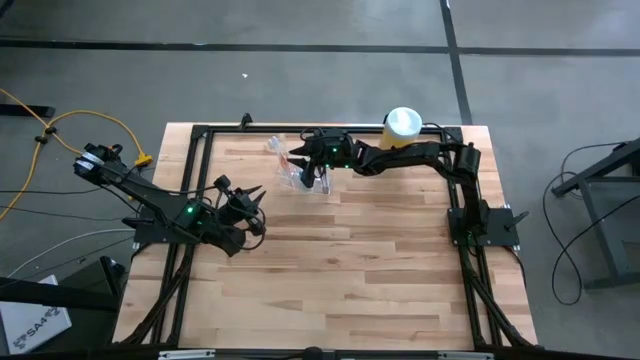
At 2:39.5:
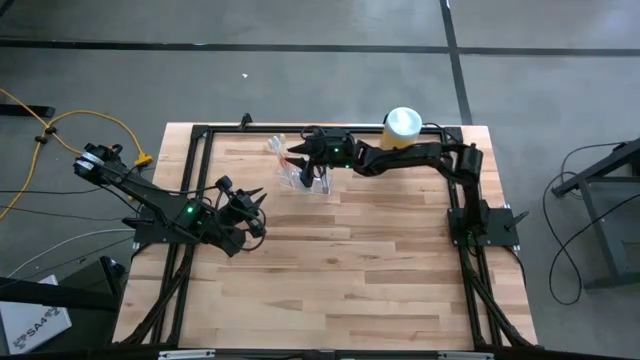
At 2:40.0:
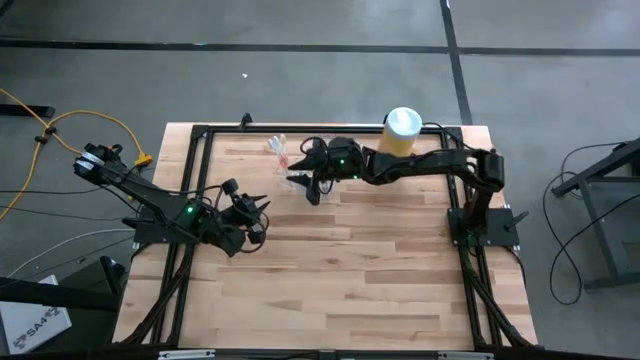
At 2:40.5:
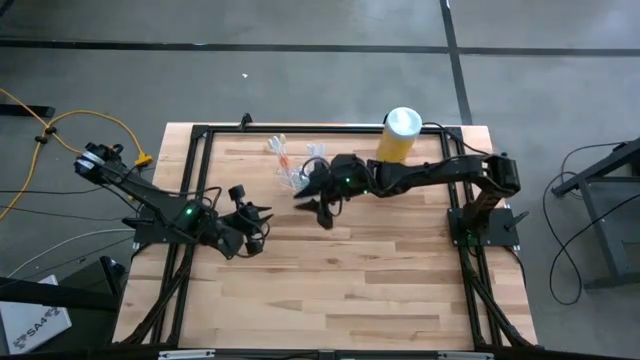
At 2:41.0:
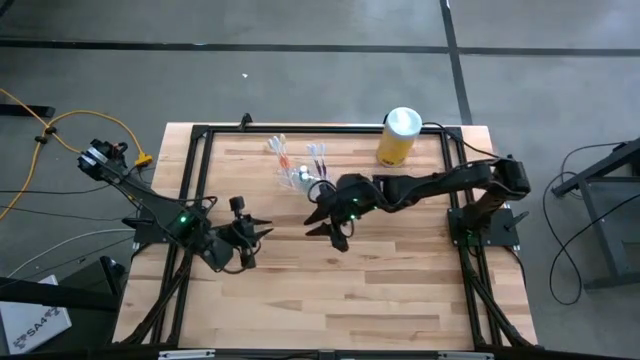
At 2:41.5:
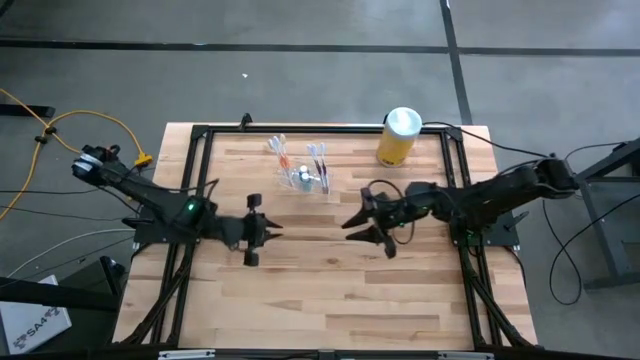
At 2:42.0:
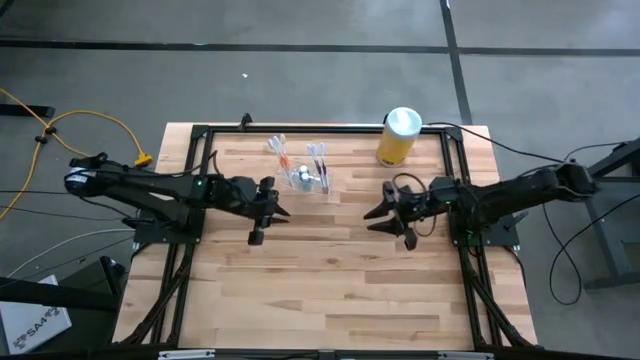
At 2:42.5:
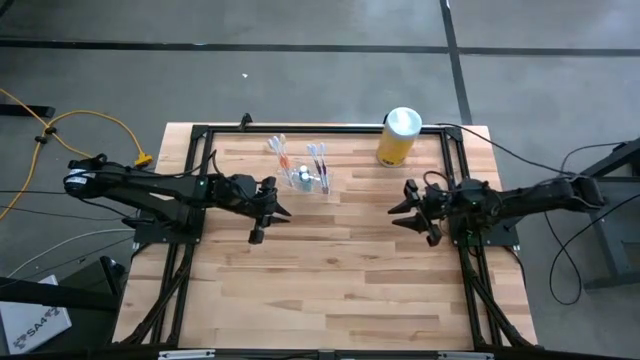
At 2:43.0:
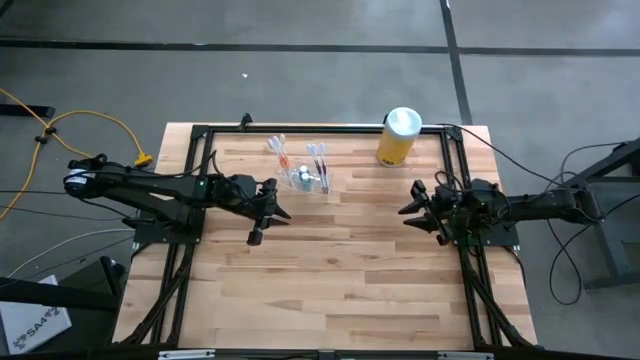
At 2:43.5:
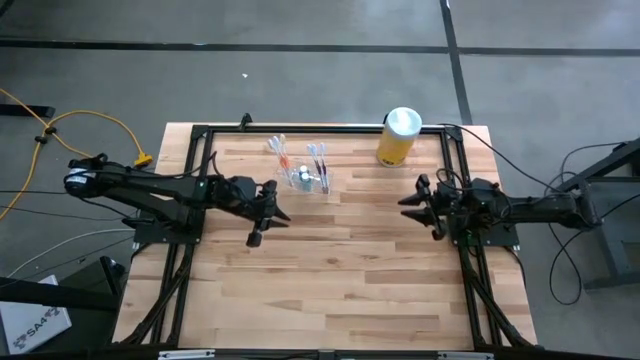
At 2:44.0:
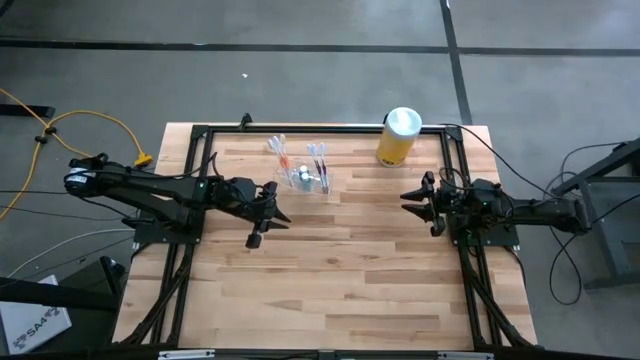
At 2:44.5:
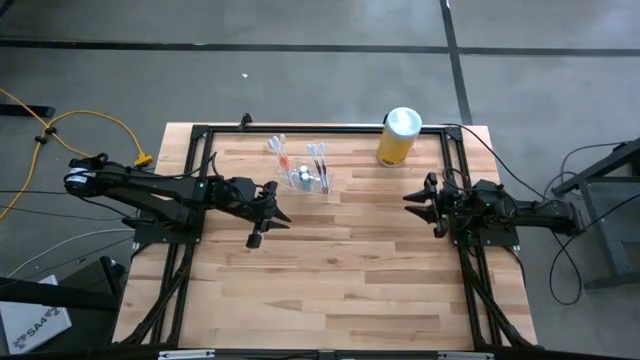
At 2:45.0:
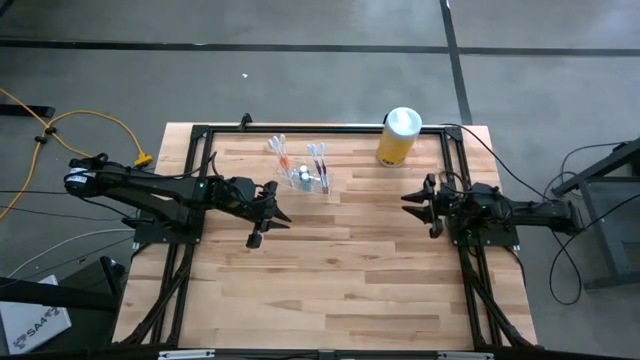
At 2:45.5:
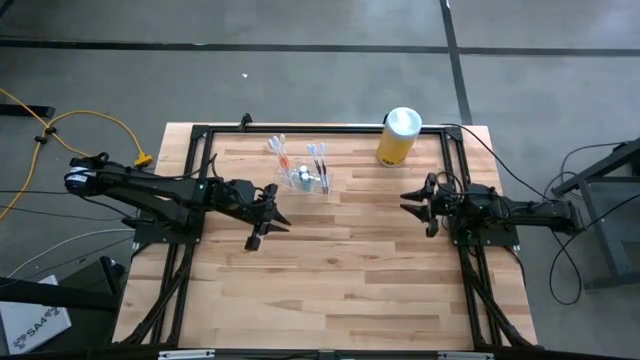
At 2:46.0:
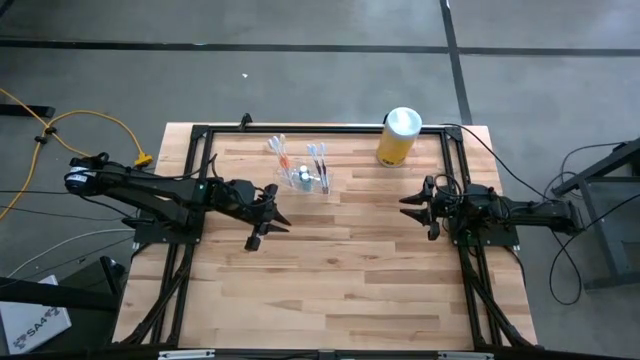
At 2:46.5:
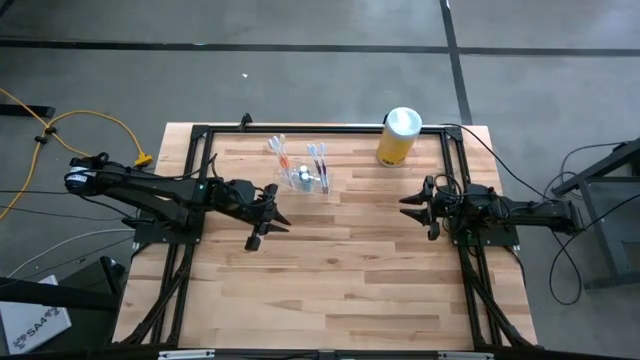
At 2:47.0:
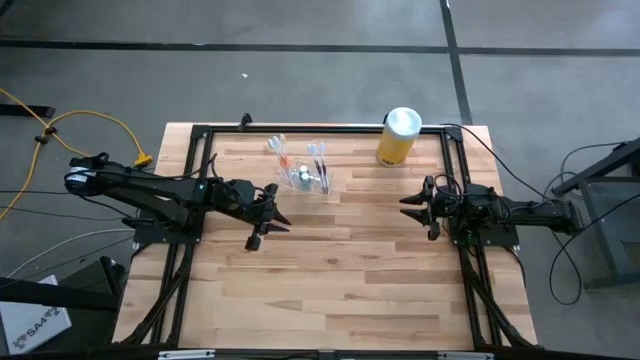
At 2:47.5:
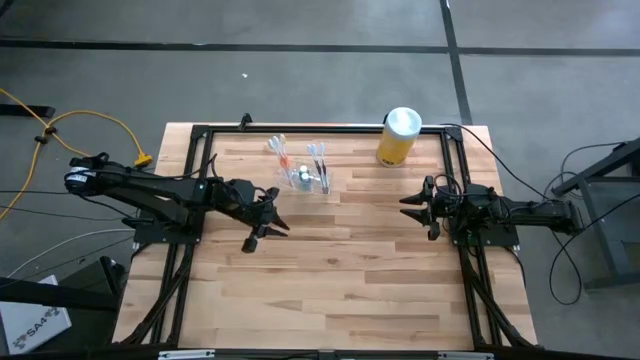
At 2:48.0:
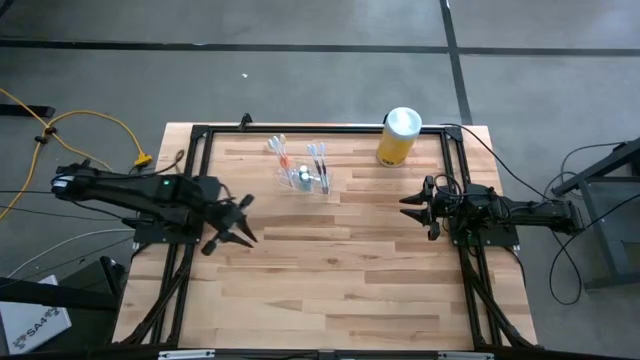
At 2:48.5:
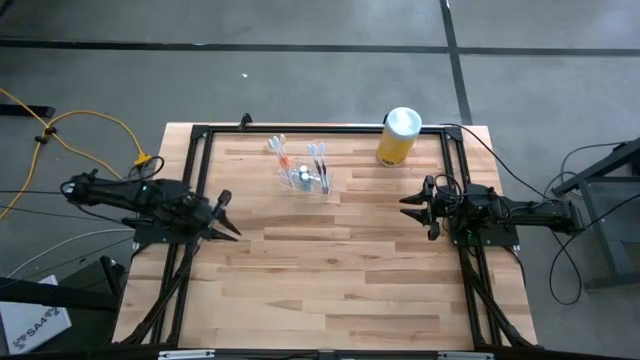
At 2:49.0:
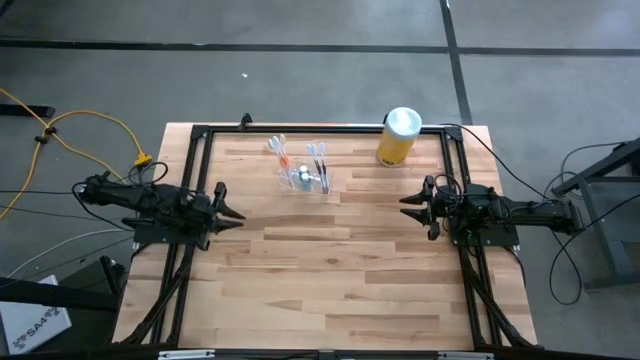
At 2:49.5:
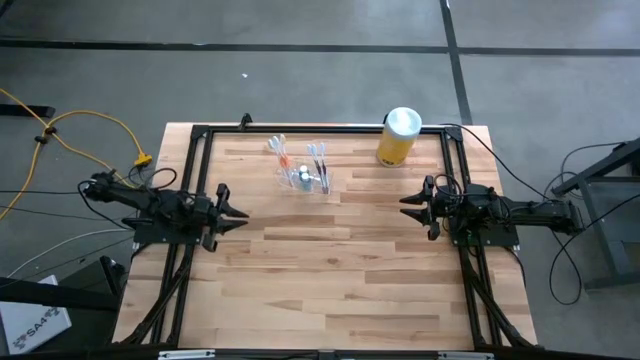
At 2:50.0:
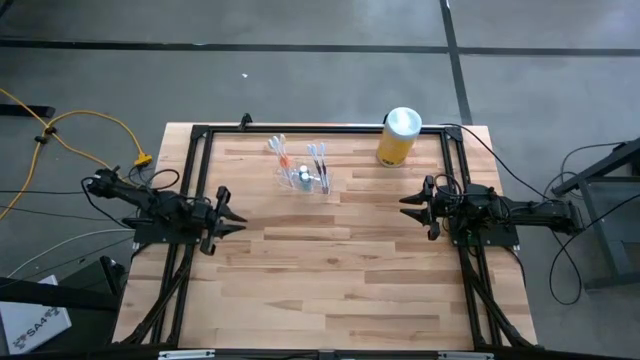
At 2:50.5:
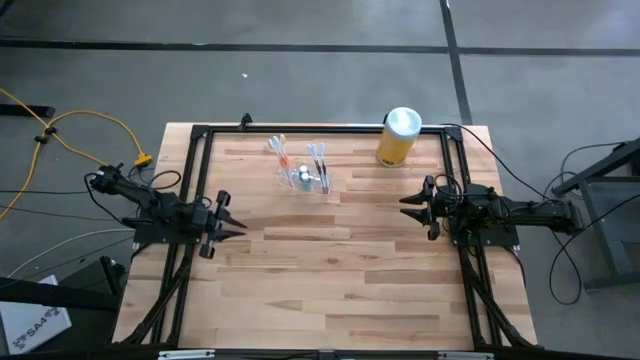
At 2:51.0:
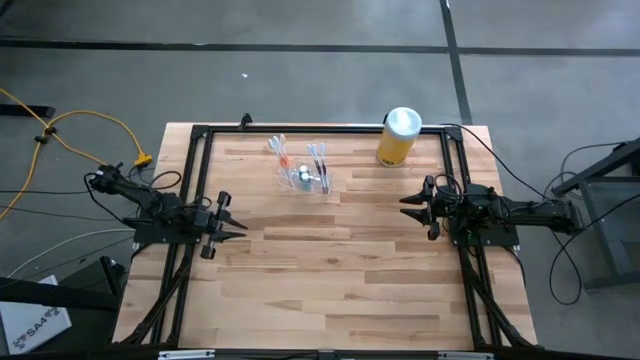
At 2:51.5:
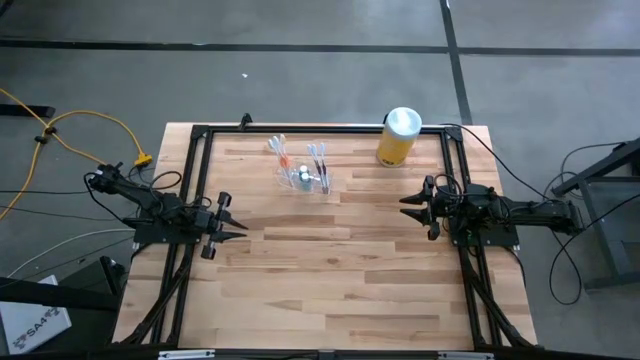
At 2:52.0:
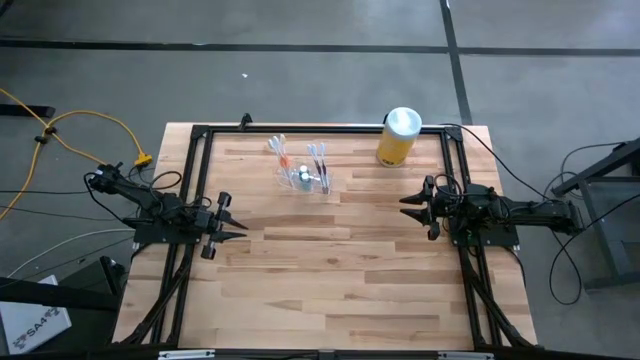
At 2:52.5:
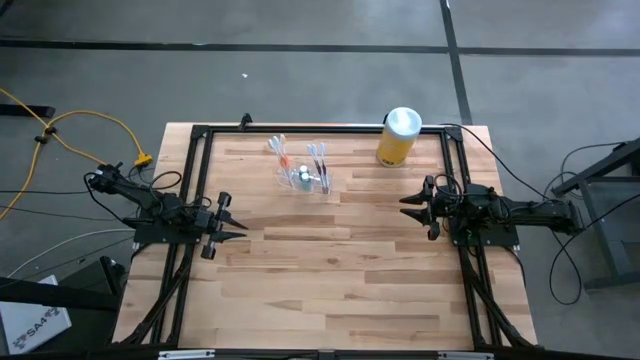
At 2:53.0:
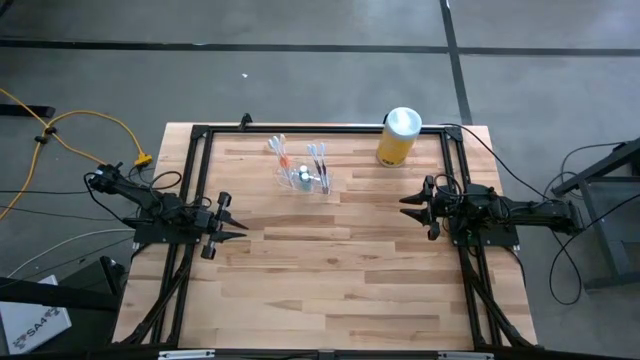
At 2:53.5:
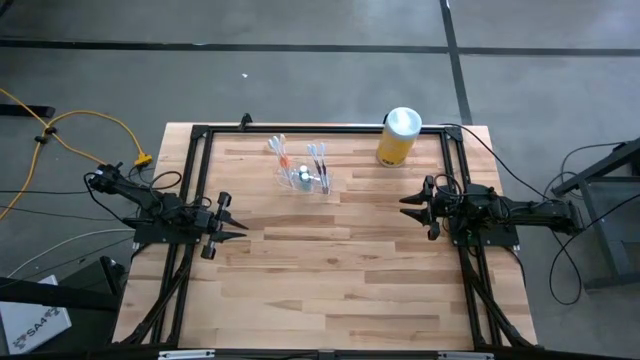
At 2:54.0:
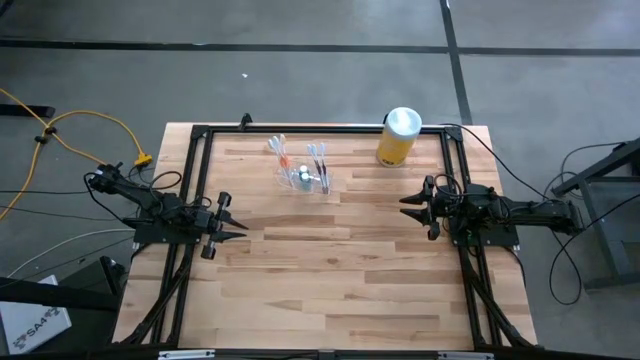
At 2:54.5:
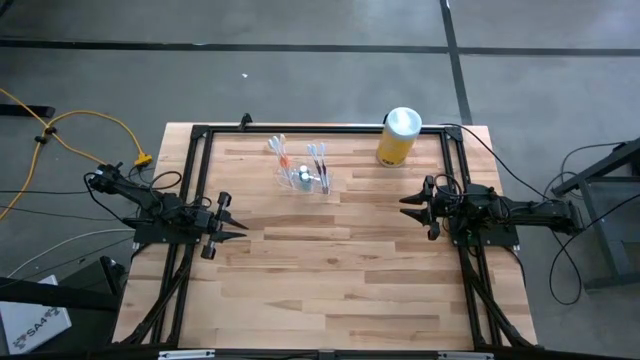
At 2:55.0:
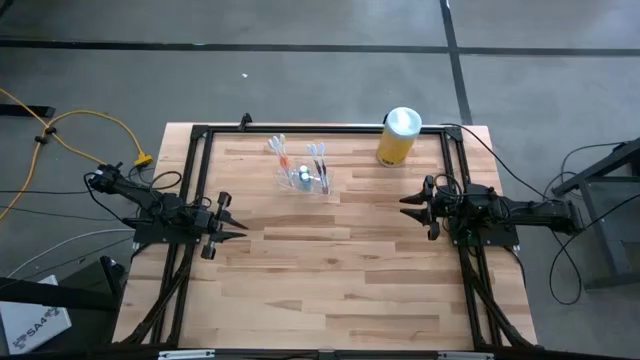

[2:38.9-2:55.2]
Task: Pick & Place toothbrushing station
Return to Home Position

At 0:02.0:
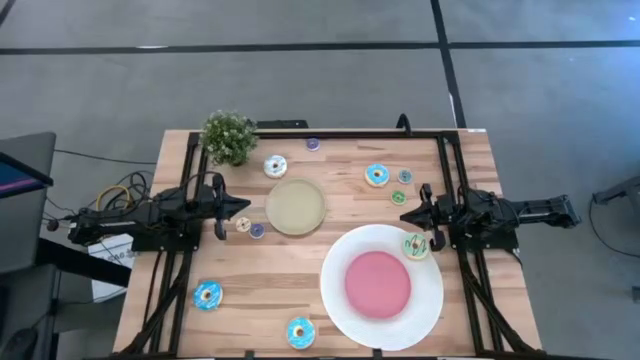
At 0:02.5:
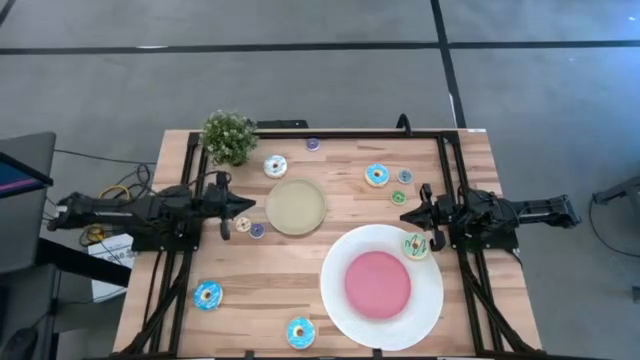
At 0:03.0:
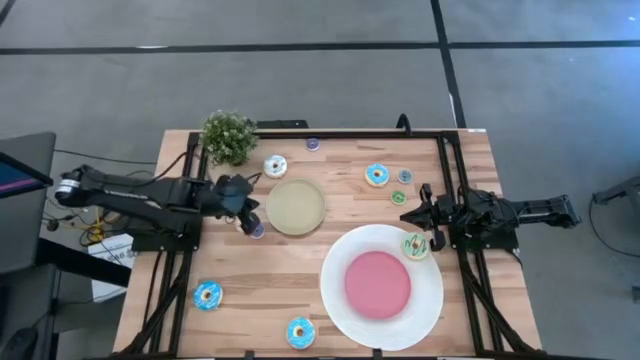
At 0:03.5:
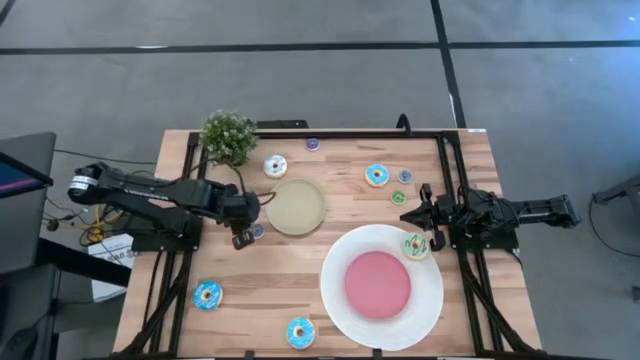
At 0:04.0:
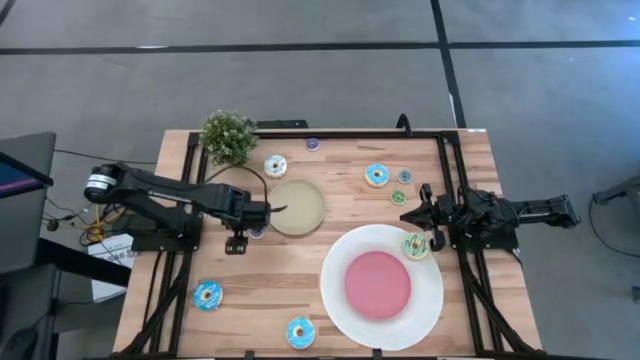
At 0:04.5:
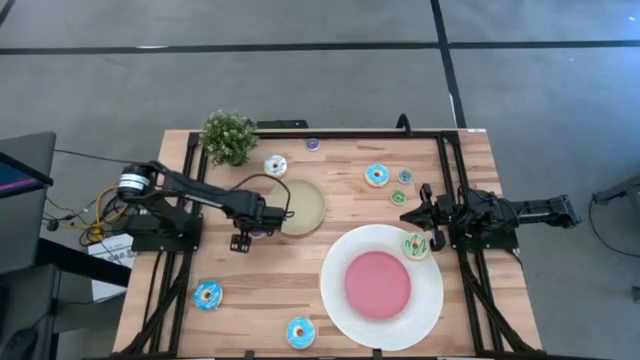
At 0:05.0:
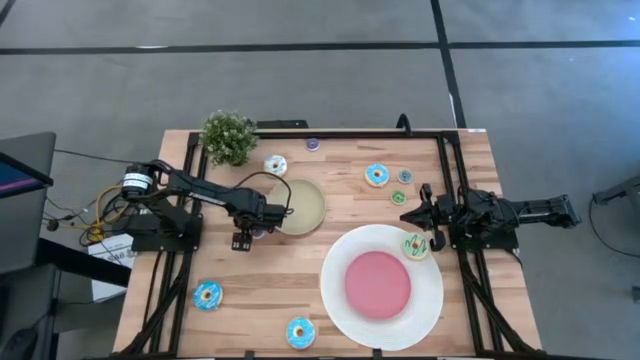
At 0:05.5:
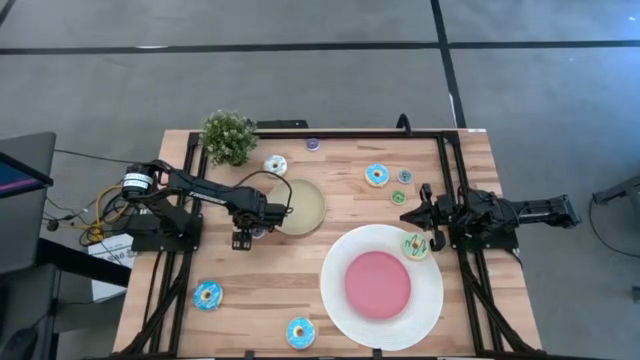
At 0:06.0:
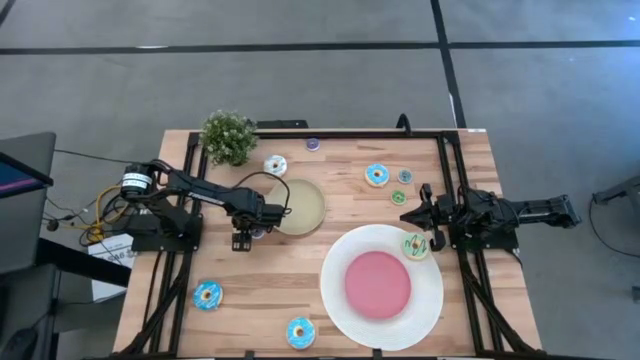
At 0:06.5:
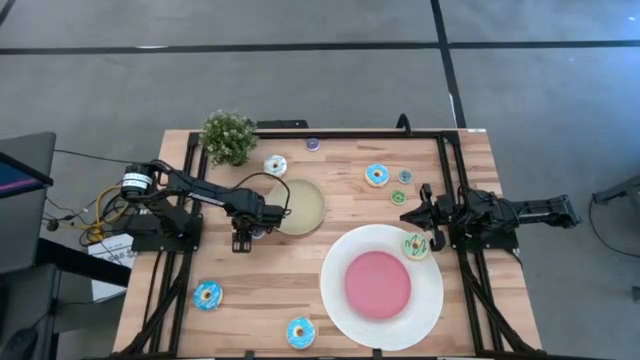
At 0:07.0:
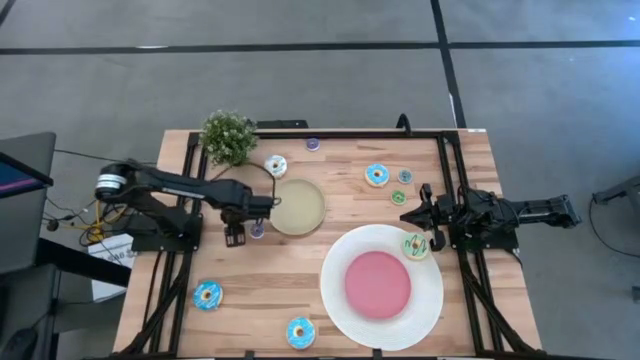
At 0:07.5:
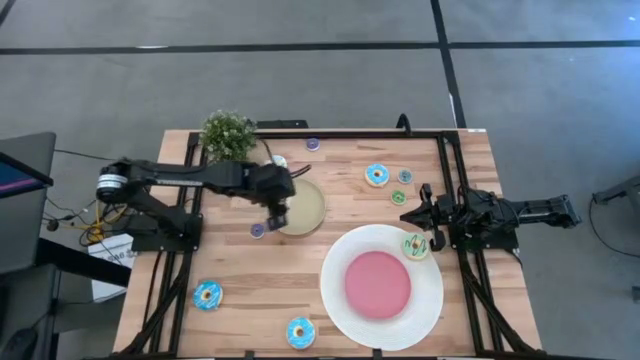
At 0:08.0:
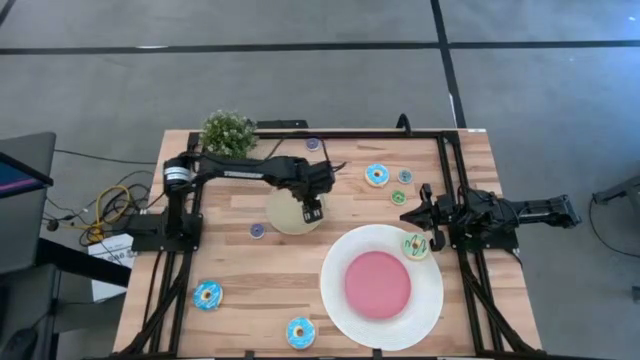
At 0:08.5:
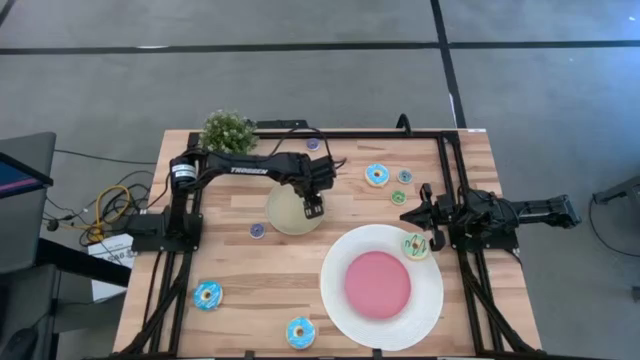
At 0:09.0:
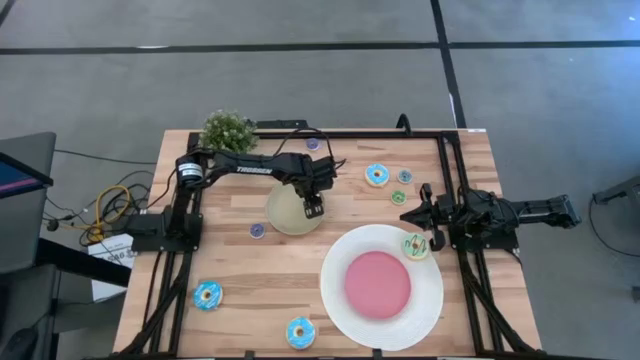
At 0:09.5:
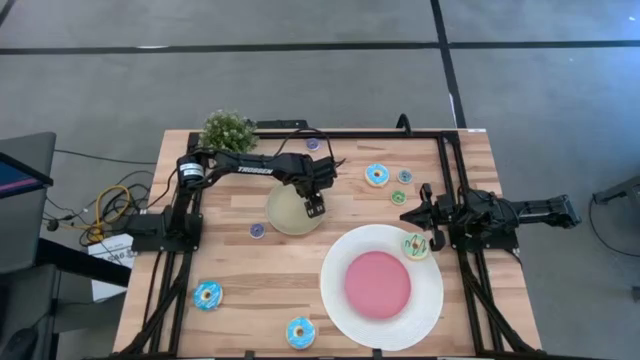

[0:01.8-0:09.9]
Task: Pick & Place donuts
Put the small white donut on the brown plate
